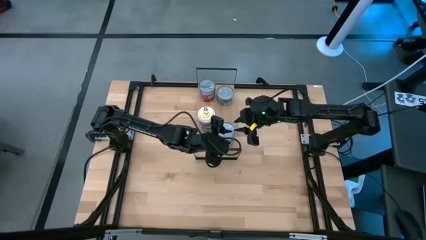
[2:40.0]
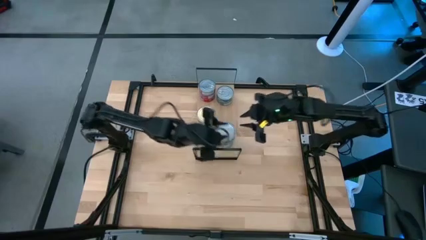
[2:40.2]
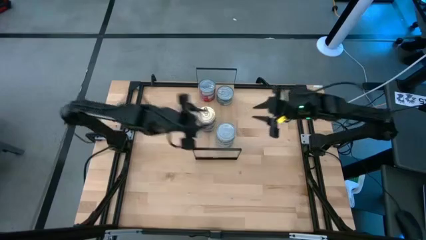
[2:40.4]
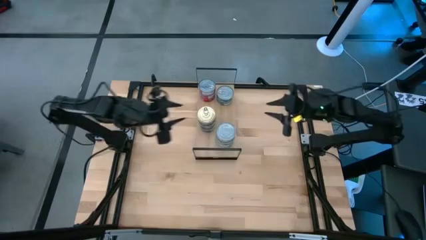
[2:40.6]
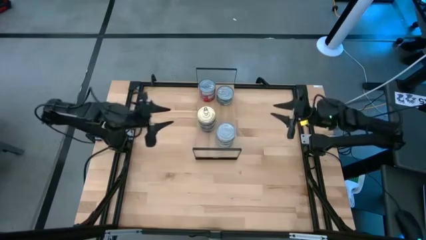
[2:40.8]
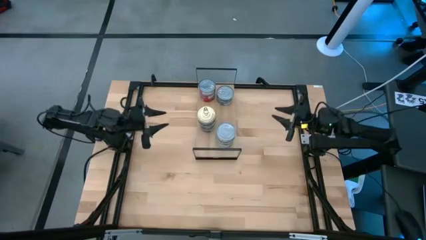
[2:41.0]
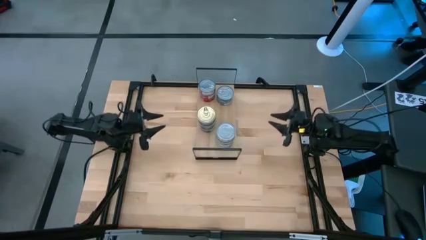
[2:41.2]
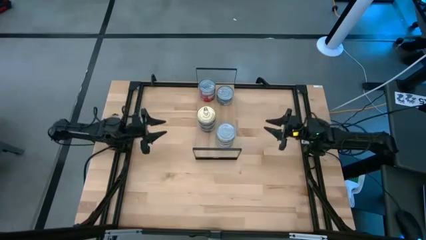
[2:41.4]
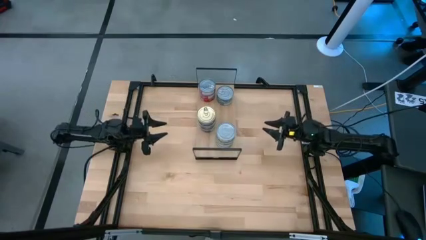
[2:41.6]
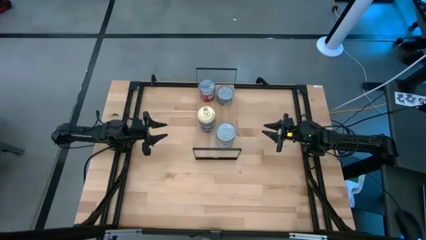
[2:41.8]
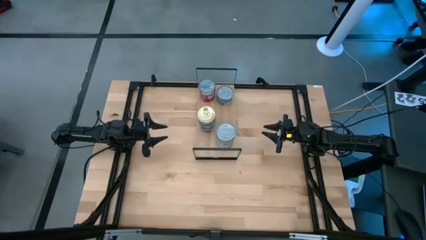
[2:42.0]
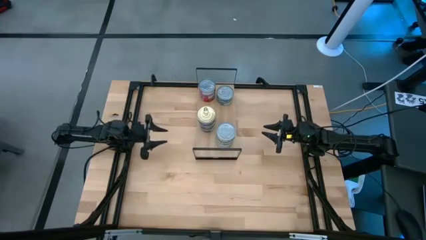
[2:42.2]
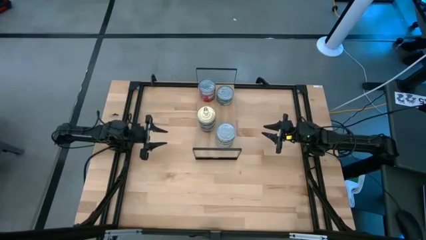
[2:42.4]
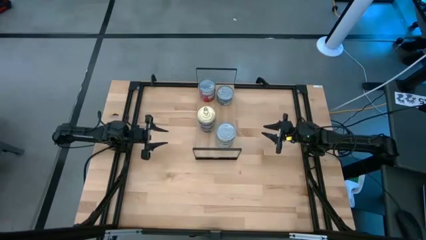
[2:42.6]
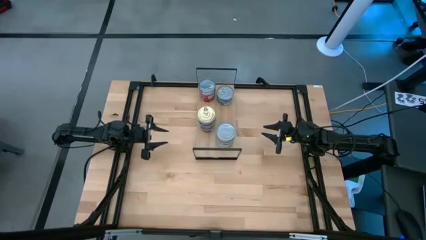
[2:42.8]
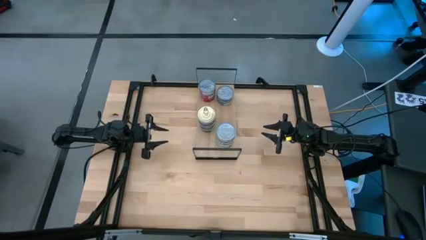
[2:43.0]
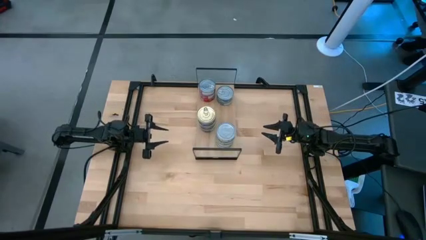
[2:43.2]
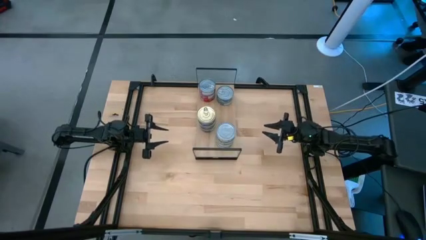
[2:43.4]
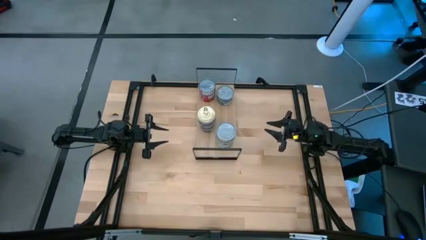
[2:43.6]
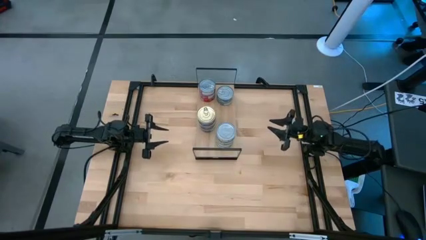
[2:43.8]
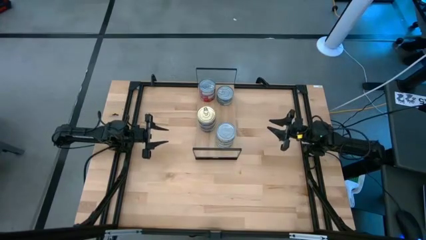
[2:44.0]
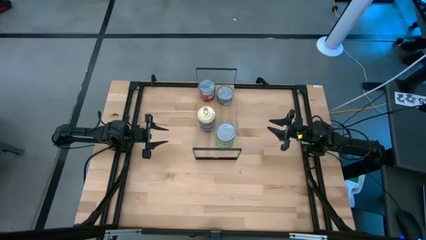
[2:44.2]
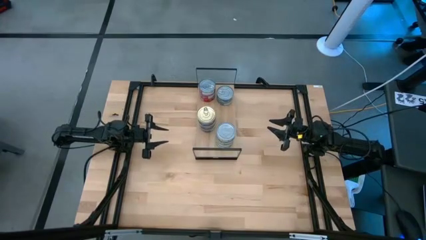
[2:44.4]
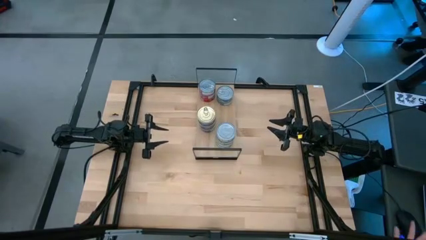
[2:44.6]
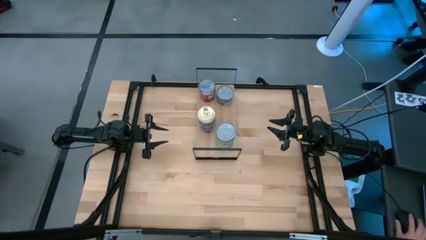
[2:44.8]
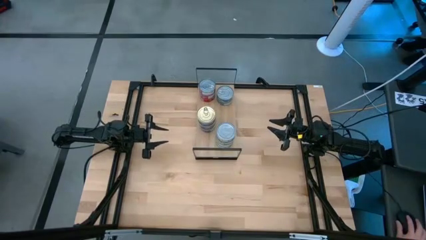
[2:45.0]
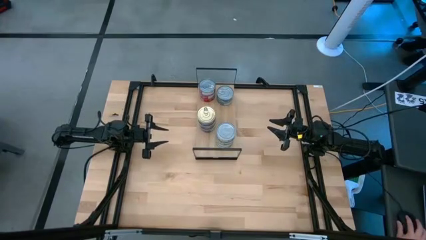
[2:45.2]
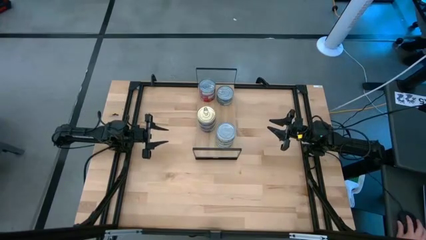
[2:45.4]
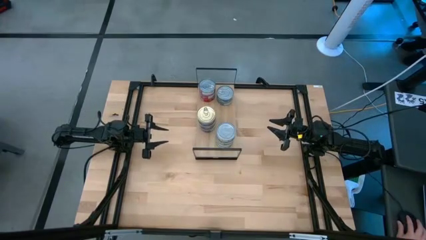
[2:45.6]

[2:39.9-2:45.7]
Task: Stack canned seafood by type on shelf
Return to Home Position

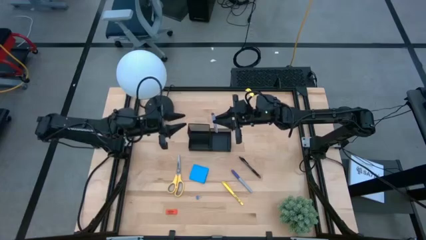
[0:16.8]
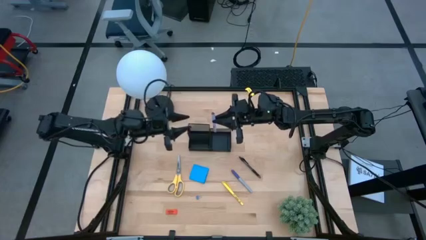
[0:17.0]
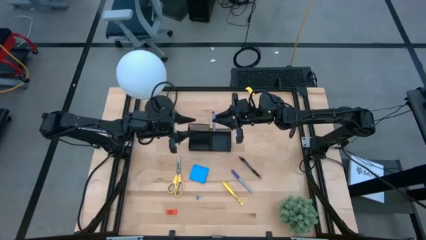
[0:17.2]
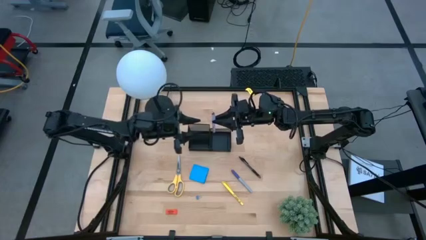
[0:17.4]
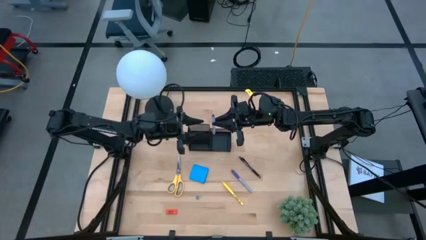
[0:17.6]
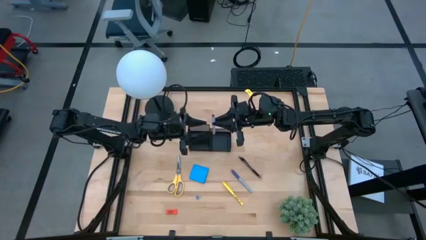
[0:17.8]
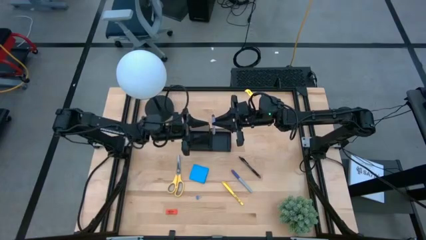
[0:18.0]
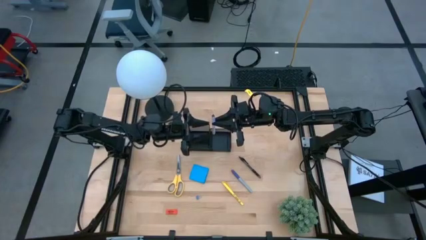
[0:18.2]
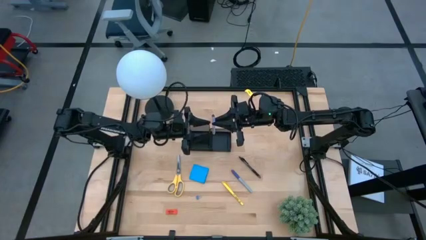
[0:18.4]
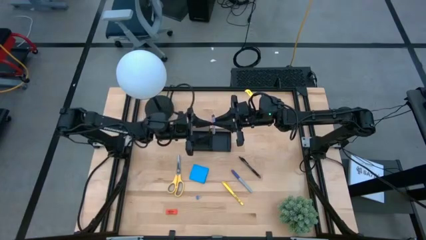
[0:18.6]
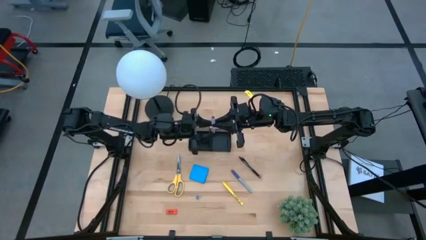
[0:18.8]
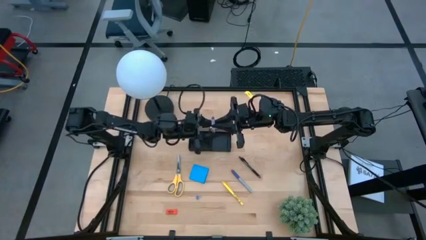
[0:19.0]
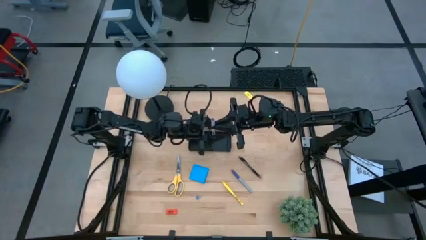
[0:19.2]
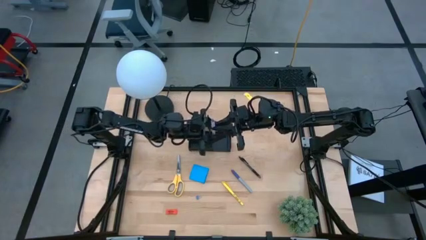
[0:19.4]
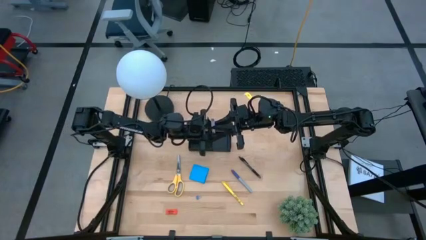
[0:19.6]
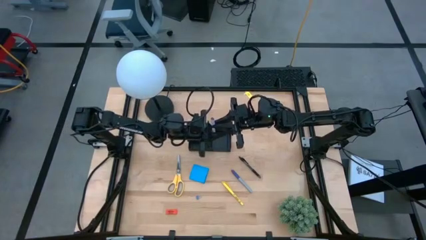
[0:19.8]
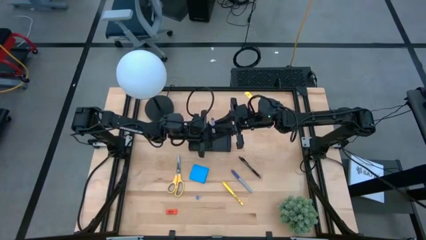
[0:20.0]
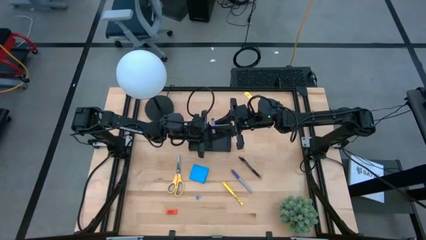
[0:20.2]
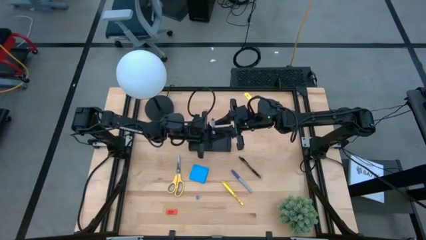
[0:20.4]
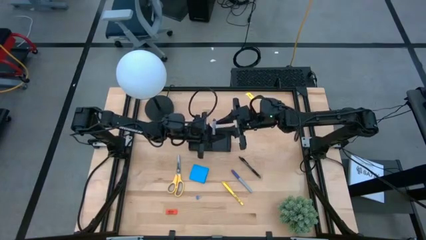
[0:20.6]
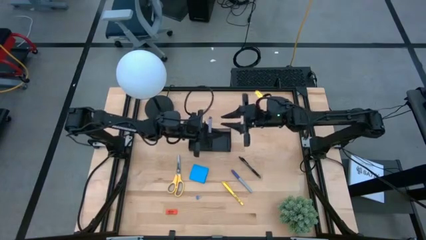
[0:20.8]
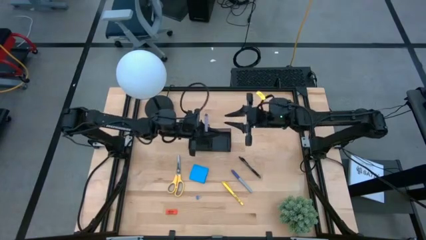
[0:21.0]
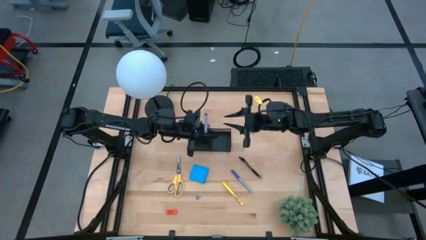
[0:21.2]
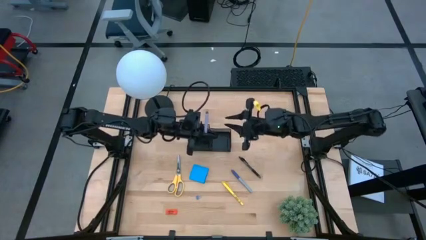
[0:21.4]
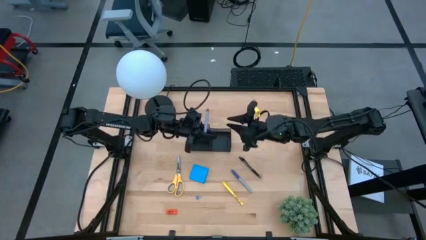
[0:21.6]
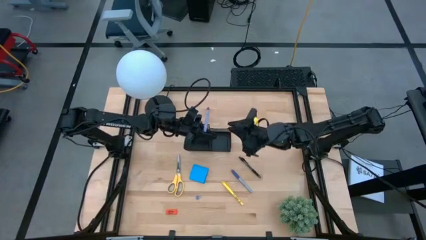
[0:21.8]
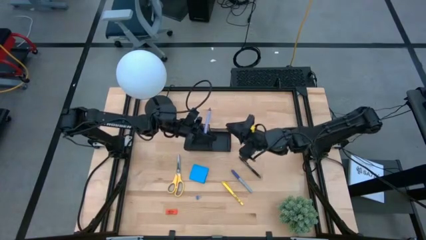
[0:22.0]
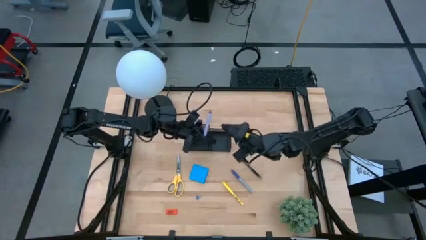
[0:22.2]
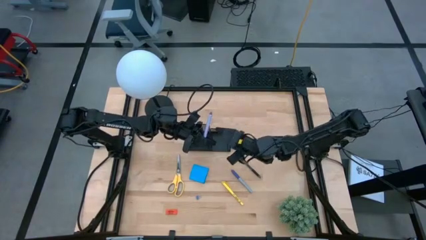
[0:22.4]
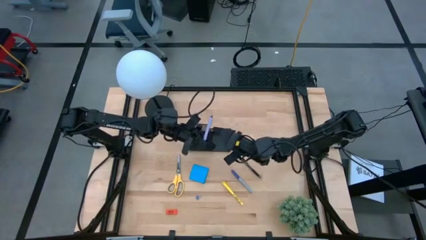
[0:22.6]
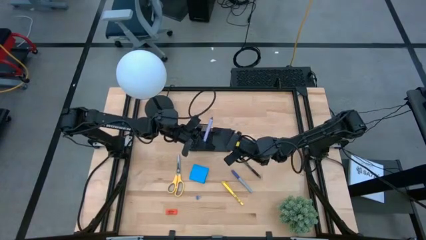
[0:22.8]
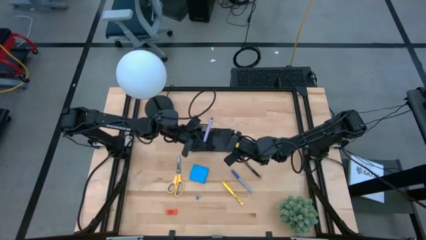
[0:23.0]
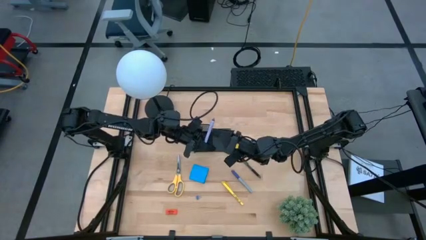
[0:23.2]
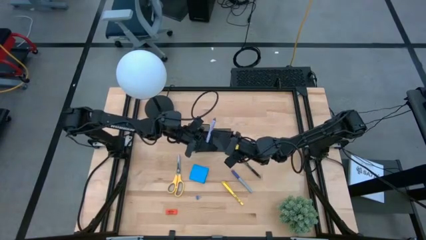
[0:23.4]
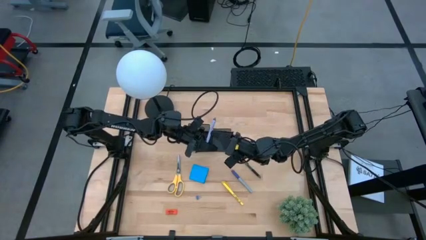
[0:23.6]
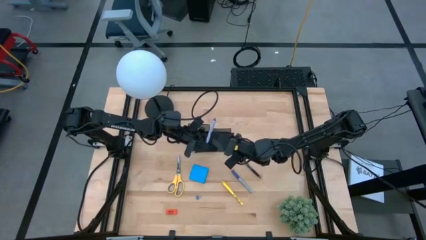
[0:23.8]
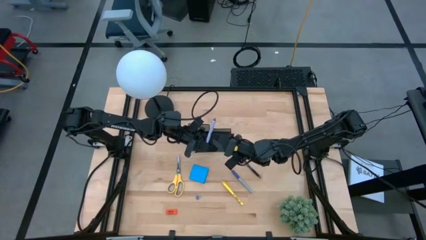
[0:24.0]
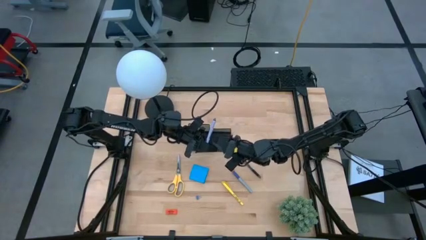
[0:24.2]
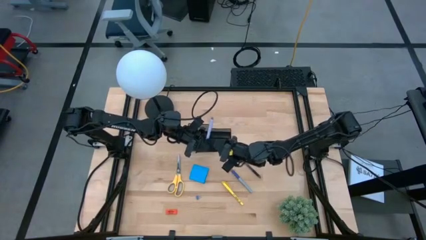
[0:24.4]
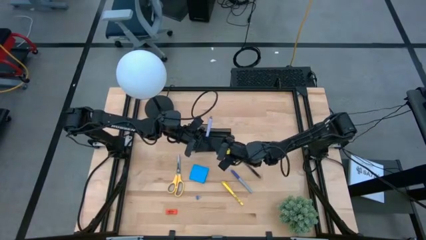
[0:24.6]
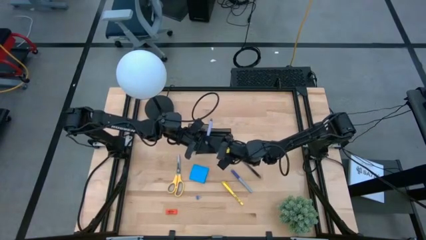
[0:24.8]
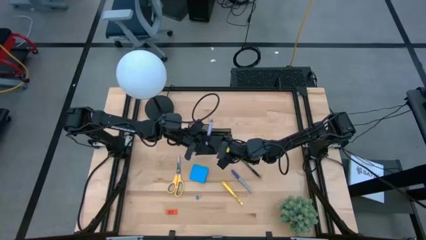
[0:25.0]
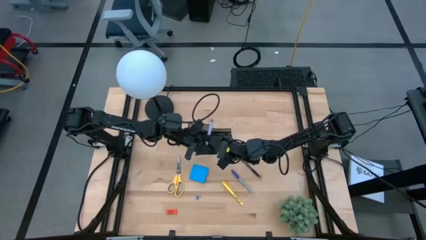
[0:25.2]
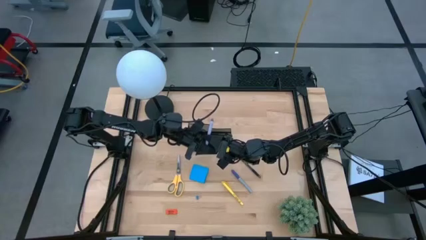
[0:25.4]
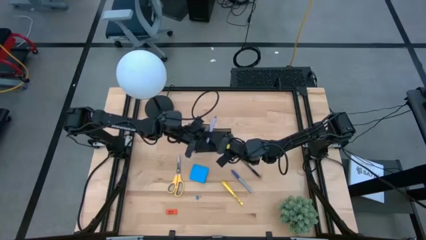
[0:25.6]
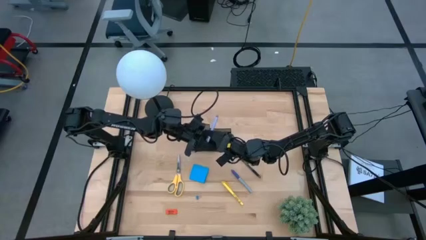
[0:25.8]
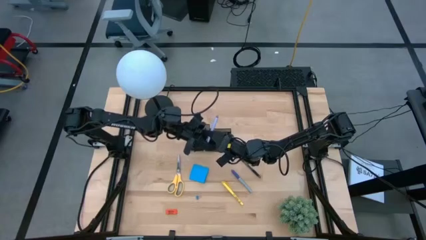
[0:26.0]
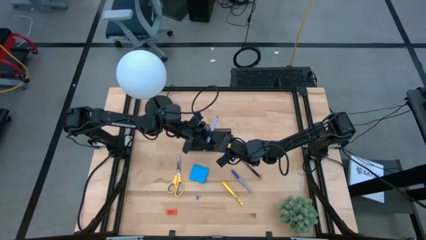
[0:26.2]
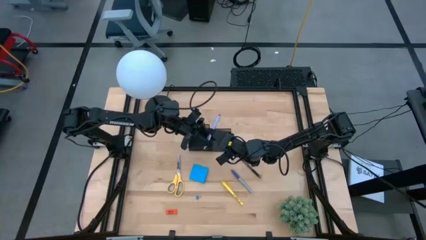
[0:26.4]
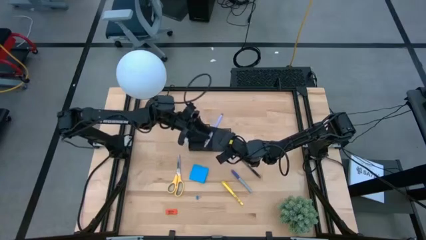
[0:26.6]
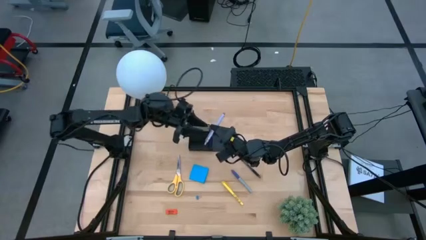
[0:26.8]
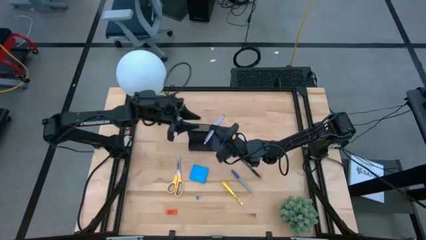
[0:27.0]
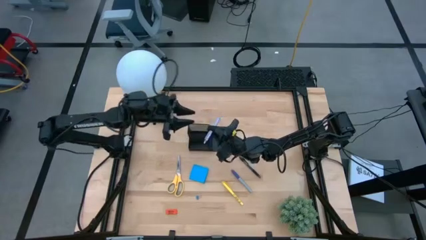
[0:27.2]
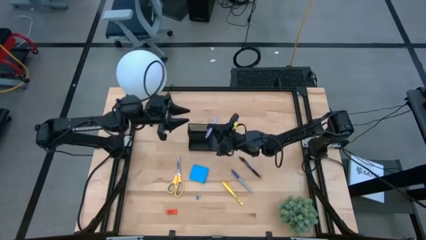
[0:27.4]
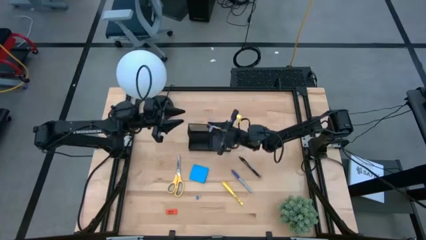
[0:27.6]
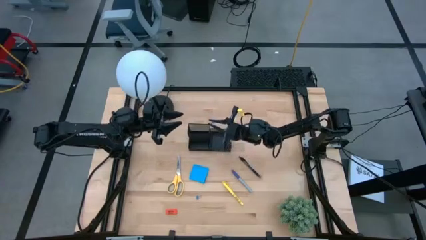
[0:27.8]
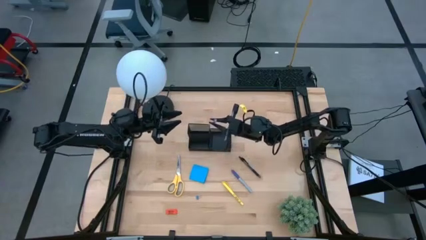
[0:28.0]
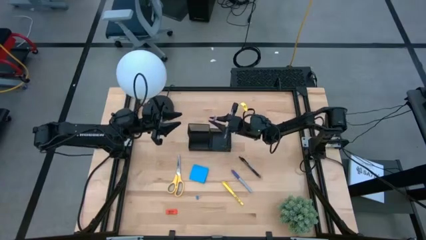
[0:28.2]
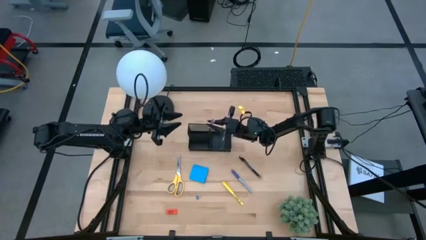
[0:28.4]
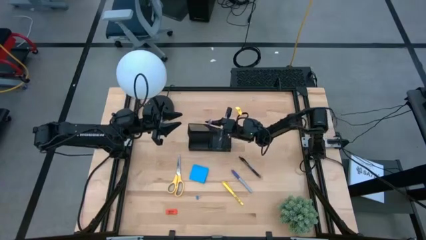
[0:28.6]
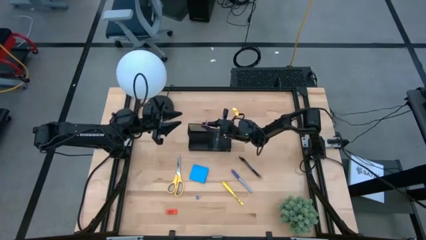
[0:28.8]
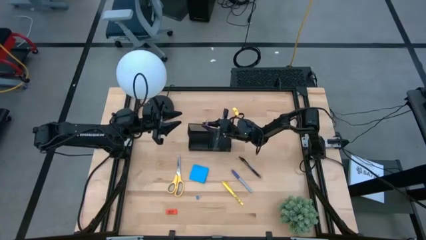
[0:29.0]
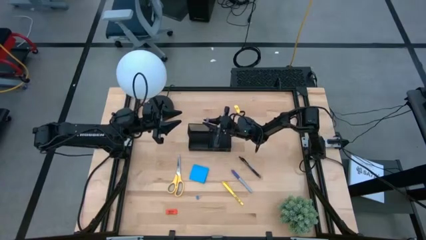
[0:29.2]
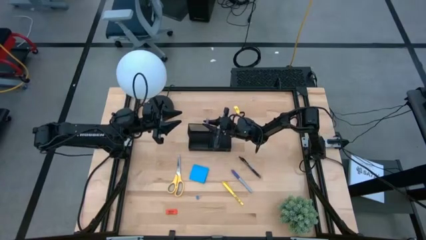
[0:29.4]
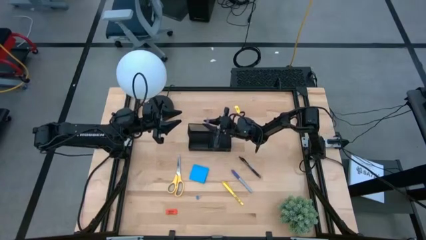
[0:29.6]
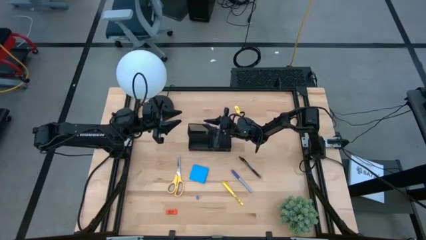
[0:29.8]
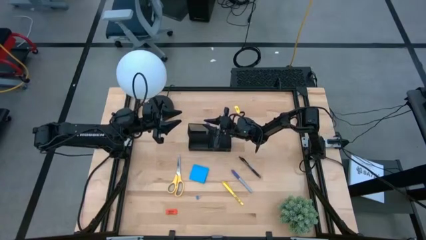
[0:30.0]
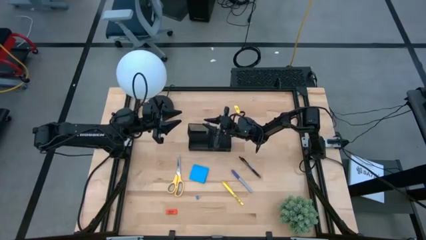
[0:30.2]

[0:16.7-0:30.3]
Task: Pick and place office supplies into organizer
Put the purple pen into the black mesh desk organizer
